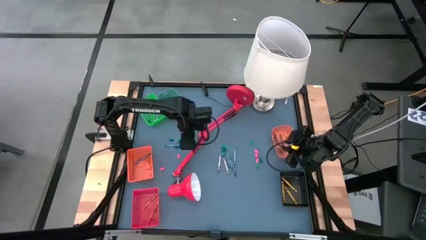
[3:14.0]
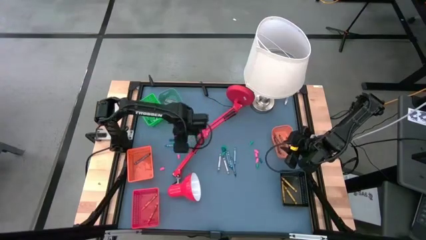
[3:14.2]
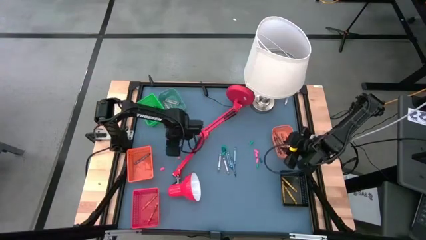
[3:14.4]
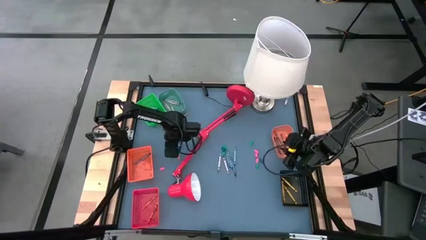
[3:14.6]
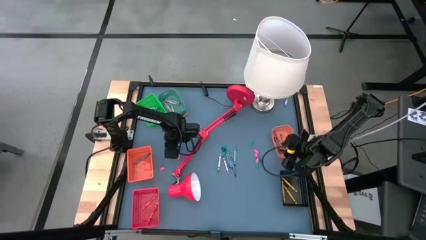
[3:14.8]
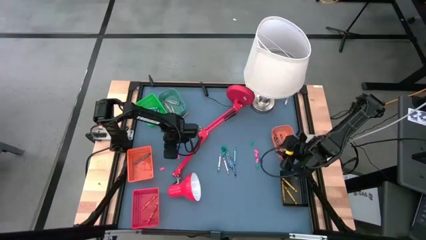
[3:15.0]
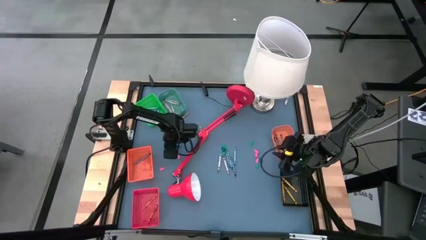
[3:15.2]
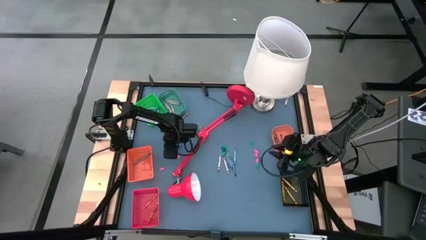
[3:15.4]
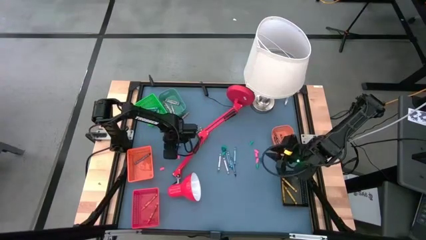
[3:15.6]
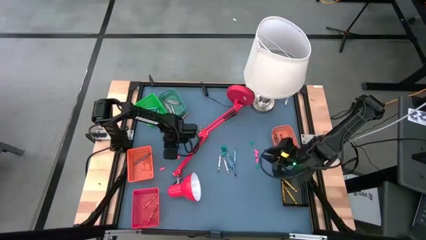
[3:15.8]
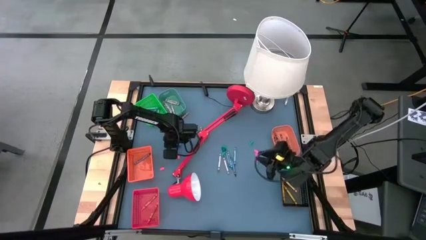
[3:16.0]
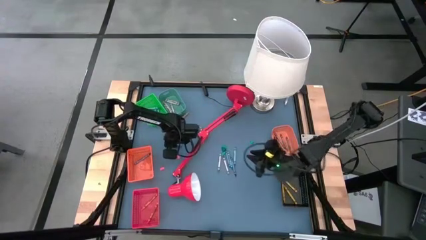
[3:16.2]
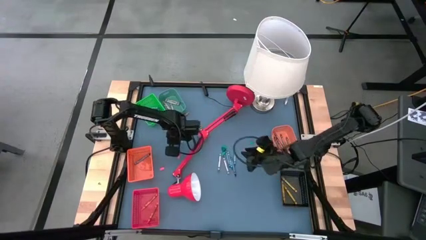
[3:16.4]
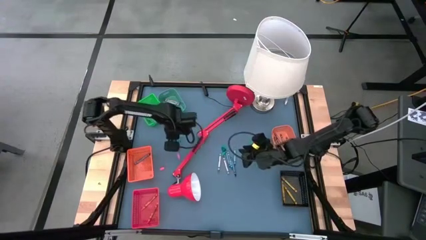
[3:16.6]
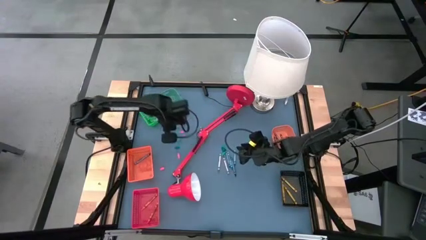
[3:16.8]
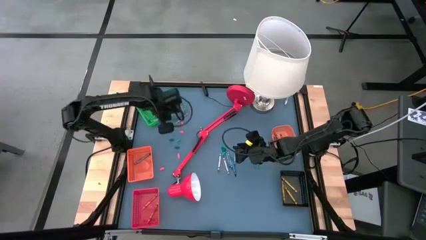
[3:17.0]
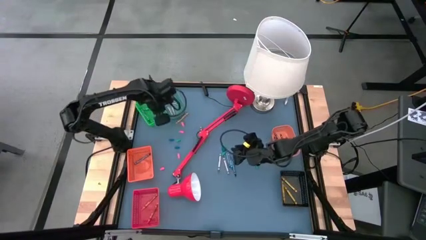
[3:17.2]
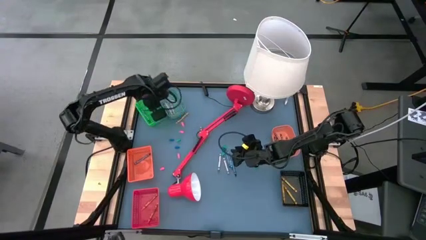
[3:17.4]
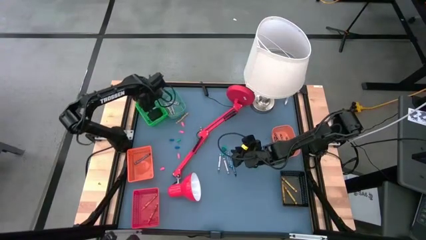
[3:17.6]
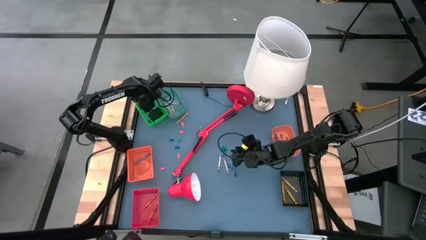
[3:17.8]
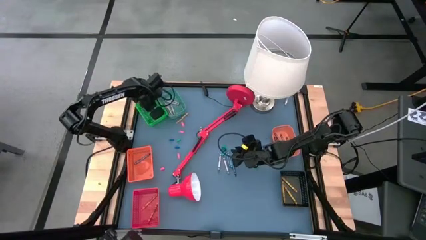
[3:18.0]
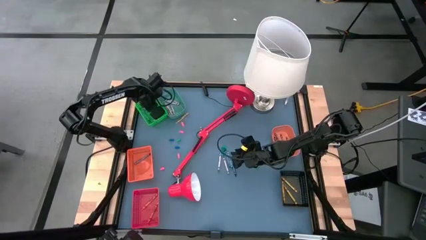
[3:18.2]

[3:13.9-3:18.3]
Task: Sort crayons
Put the left green crayon into the green bin

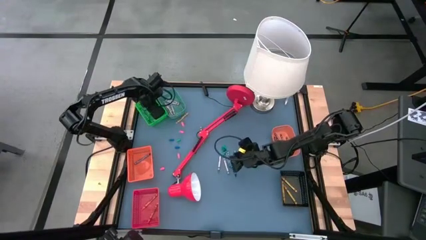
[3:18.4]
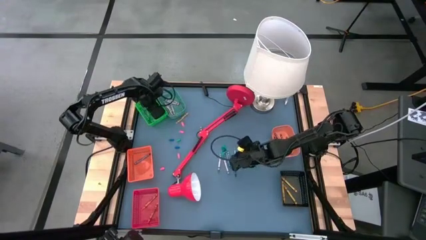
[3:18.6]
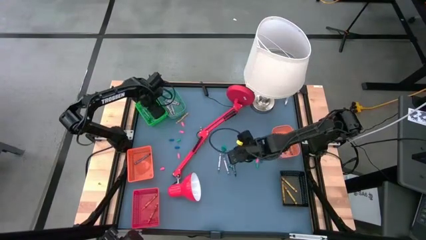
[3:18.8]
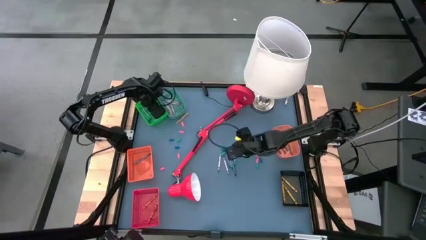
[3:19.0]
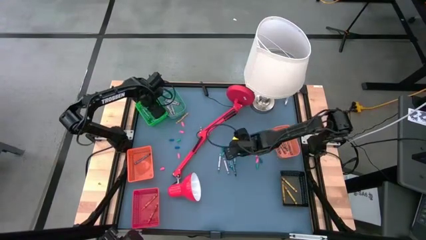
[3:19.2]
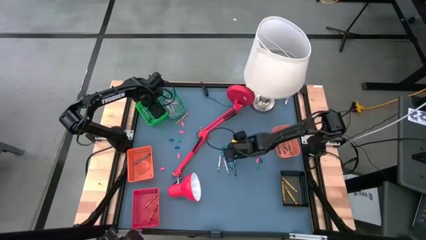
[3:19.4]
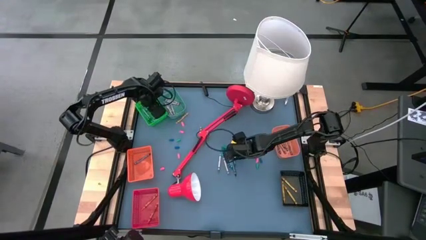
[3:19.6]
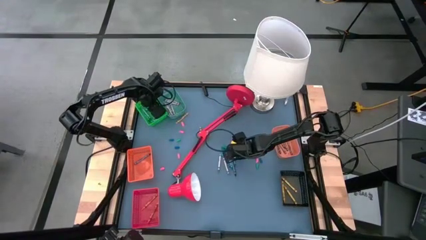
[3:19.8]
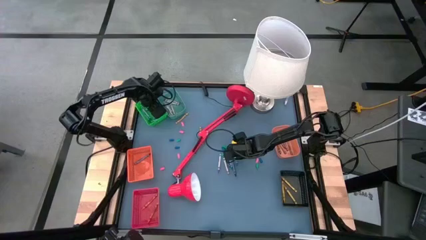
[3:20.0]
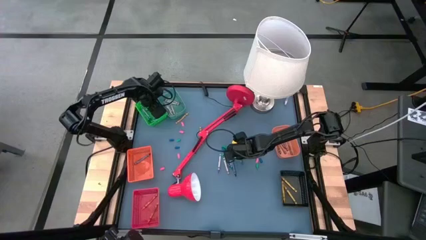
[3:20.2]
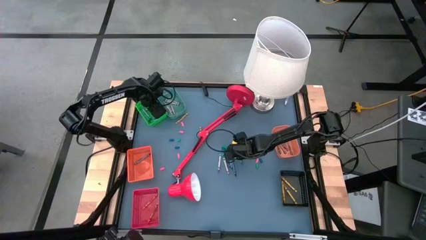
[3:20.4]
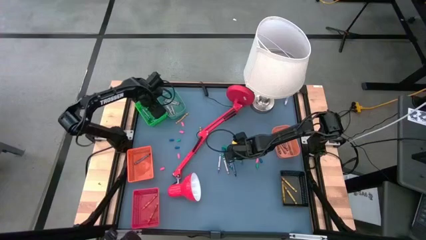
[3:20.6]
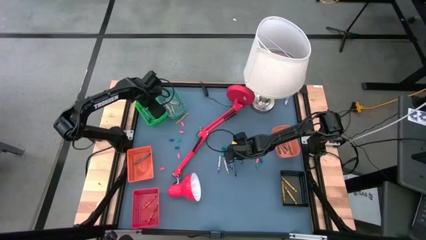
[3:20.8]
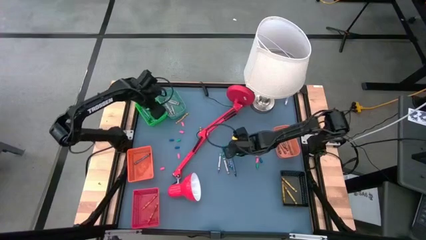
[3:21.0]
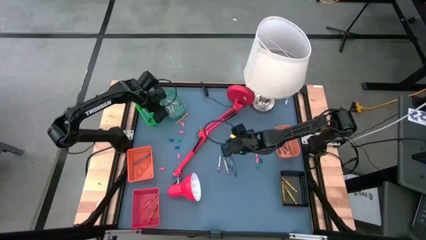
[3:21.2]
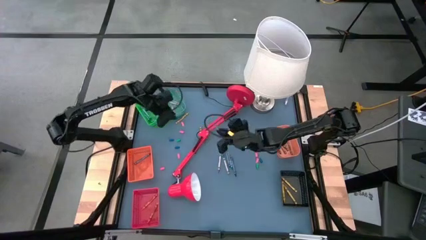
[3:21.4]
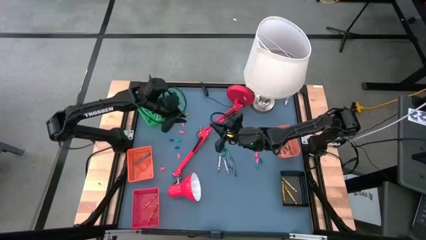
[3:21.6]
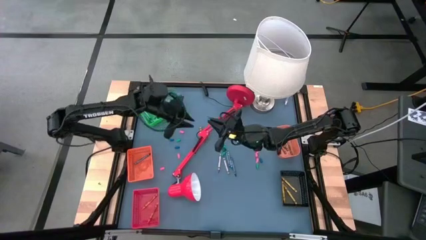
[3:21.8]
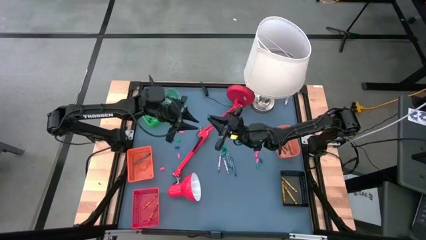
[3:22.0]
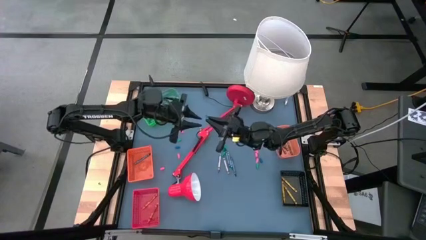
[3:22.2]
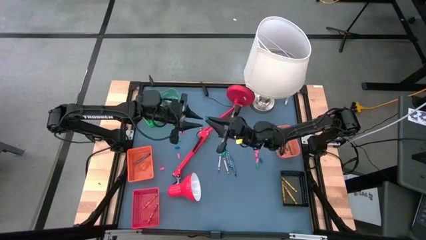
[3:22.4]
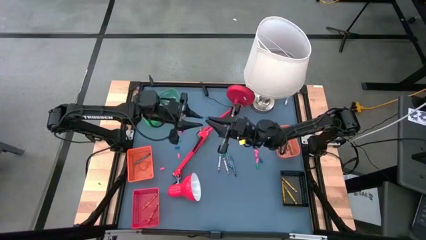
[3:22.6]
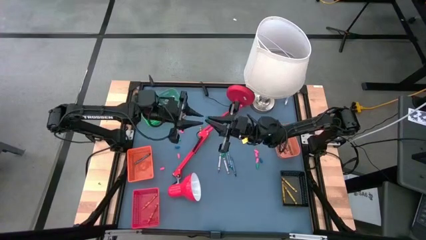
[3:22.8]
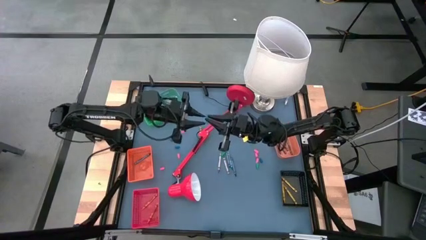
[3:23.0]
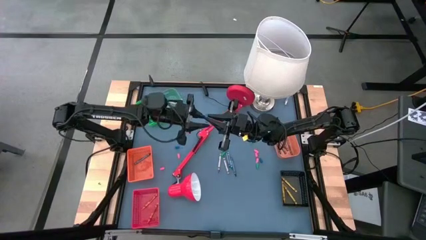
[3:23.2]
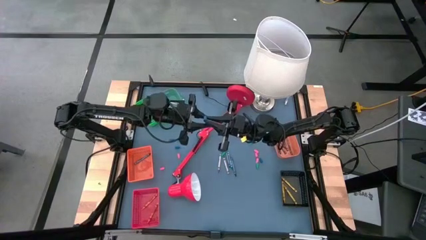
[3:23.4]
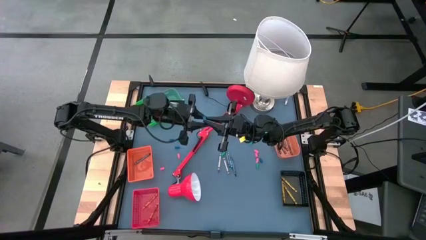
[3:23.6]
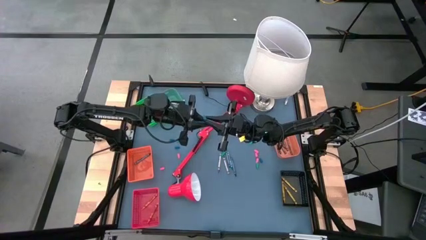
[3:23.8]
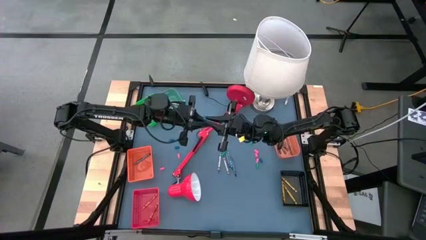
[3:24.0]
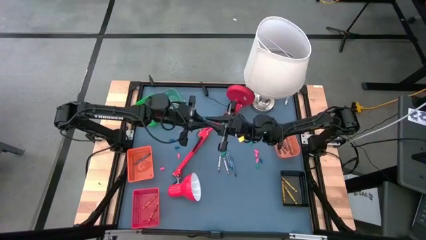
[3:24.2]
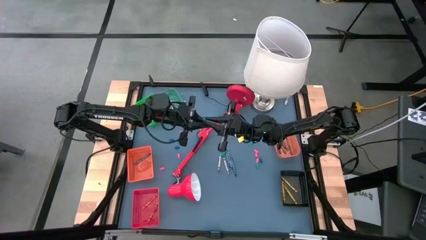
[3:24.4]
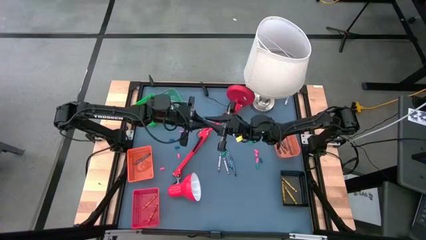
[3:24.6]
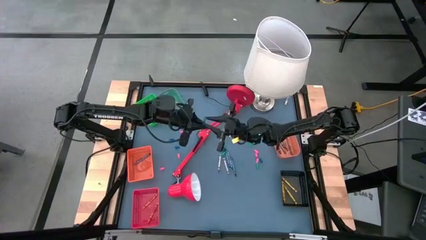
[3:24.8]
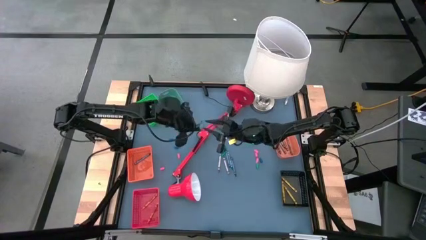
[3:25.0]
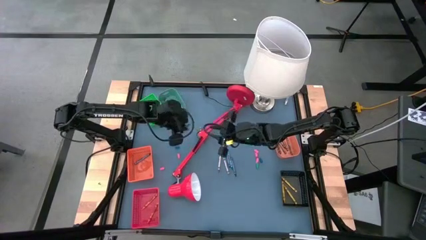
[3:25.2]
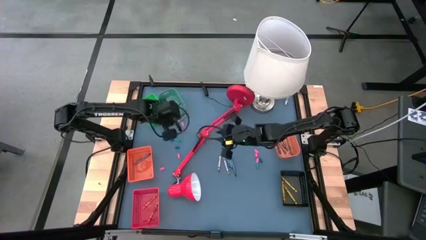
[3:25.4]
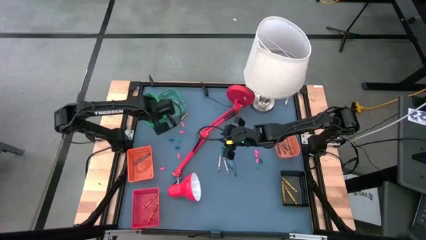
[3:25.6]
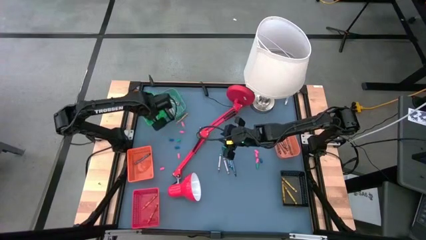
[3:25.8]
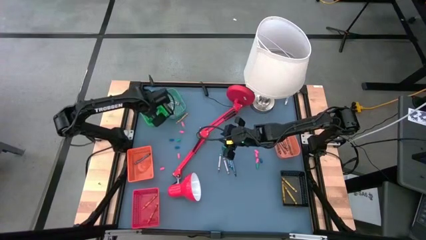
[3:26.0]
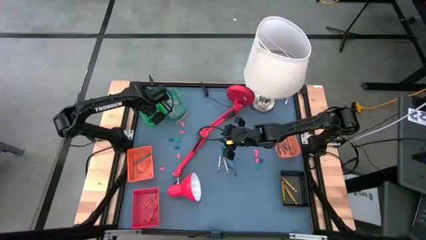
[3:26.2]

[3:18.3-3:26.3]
Put the right green crayon into the green bin

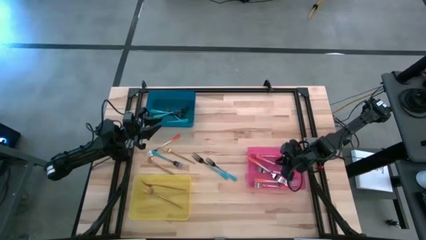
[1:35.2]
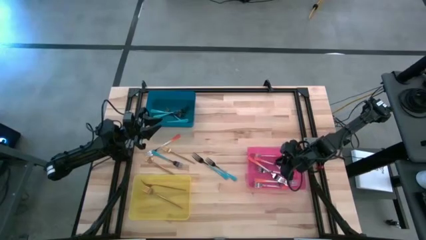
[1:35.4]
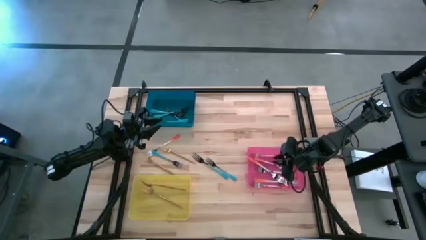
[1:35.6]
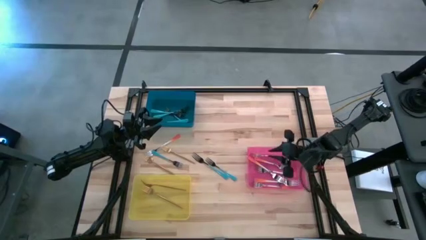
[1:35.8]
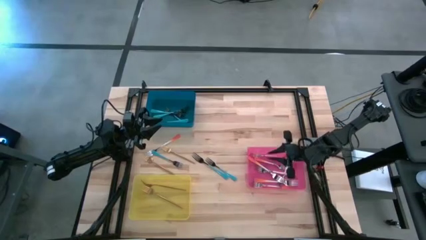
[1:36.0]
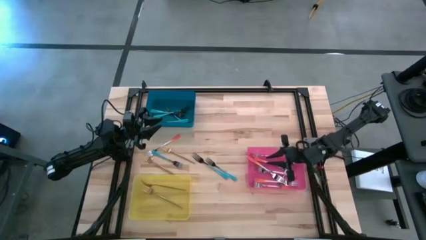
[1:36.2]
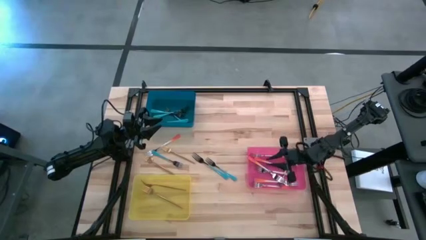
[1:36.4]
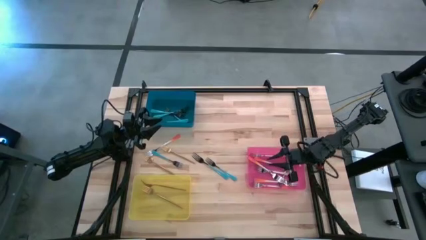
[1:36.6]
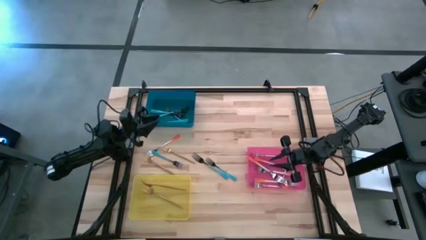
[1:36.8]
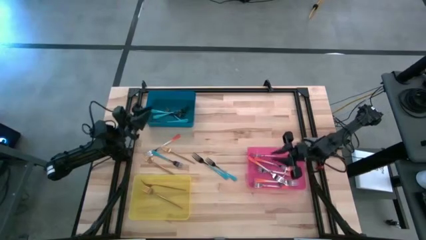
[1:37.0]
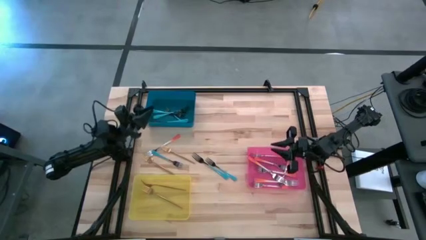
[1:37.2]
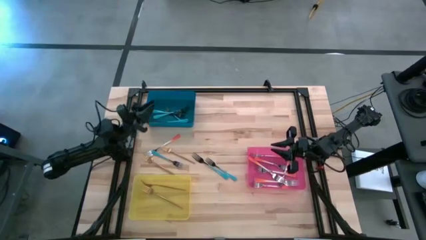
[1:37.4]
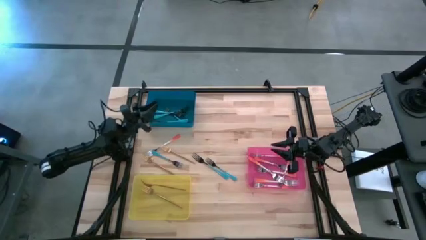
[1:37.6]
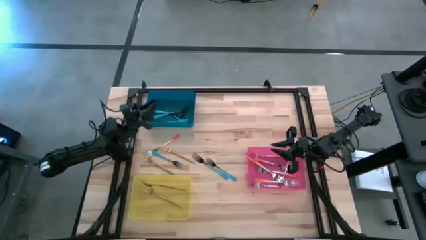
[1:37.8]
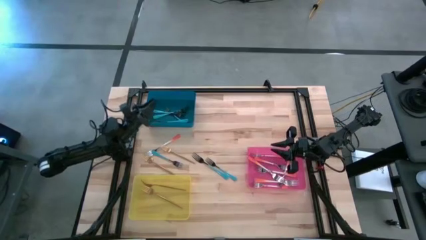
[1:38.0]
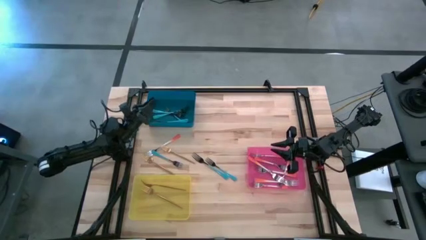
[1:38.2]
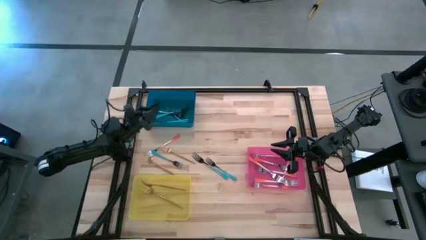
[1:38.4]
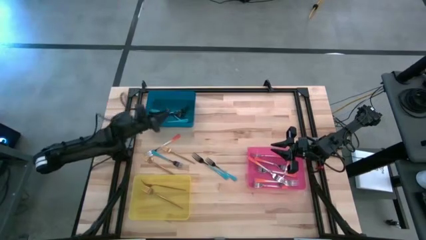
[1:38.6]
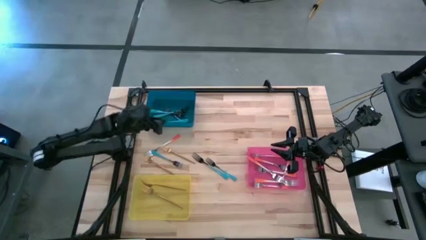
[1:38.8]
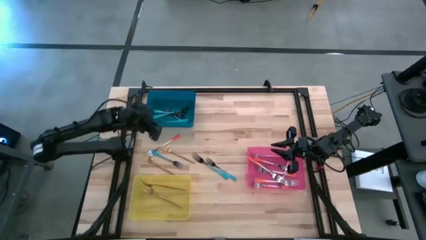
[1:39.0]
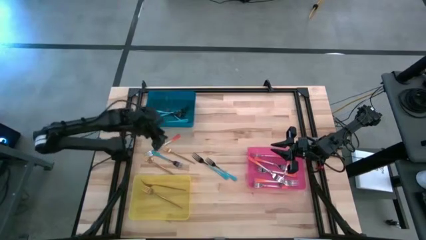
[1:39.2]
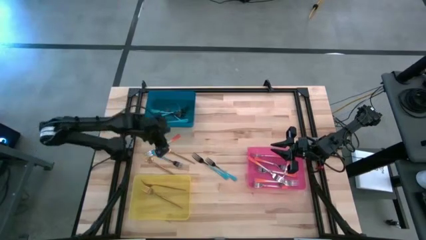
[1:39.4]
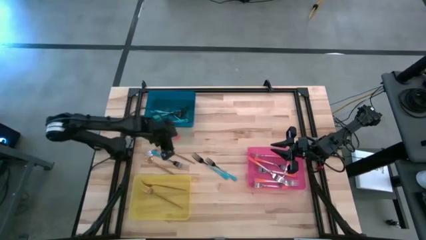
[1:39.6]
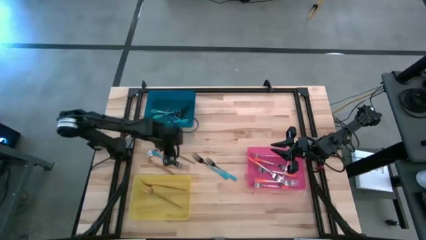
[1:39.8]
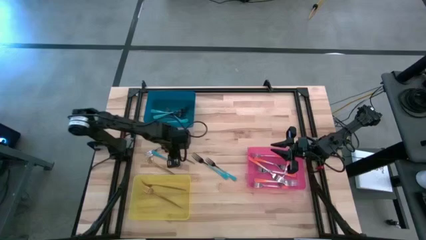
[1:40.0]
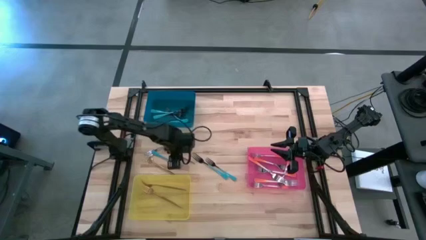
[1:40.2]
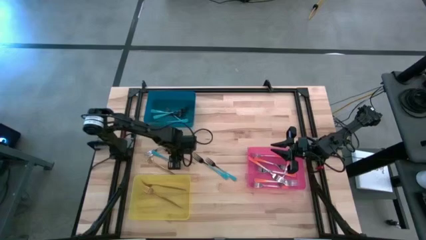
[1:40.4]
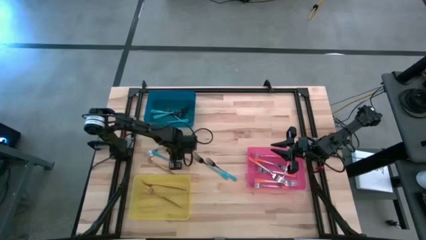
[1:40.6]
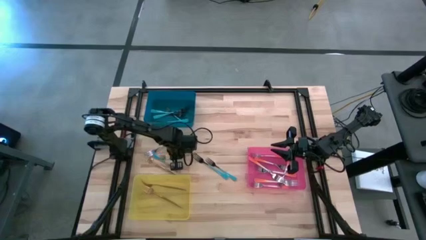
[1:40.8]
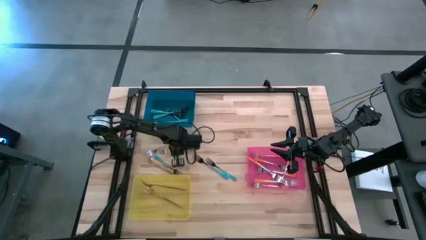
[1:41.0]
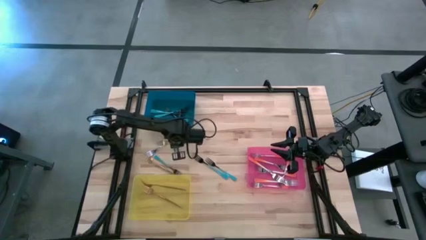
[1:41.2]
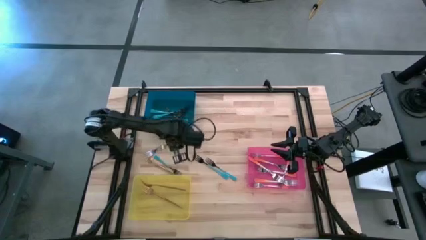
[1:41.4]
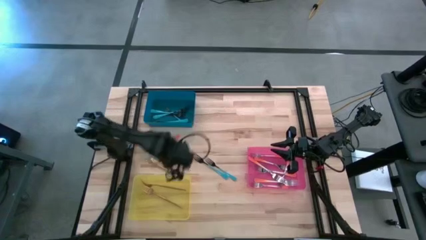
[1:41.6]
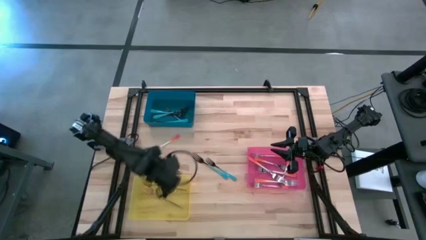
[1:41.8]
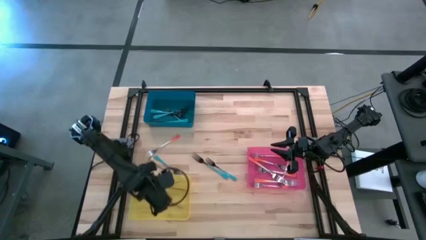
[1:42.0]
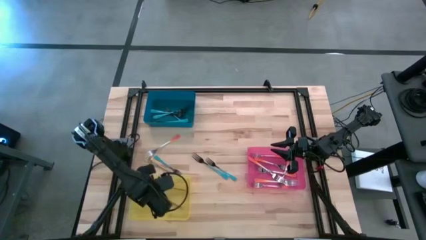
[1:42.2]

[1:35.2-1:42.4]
Task: Sort silverware by color (type)
Put the gold fork into the yellow bin
